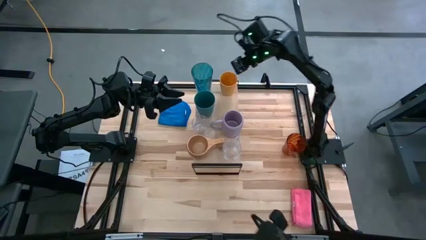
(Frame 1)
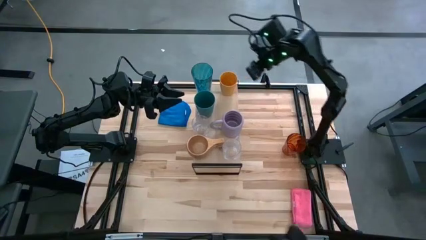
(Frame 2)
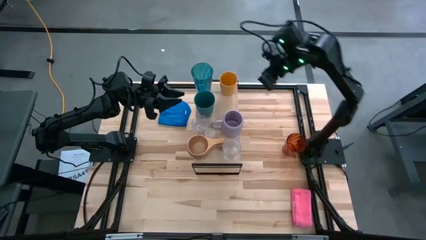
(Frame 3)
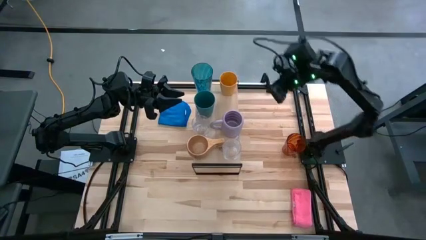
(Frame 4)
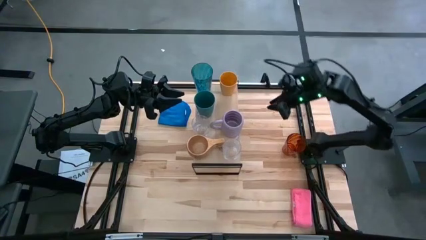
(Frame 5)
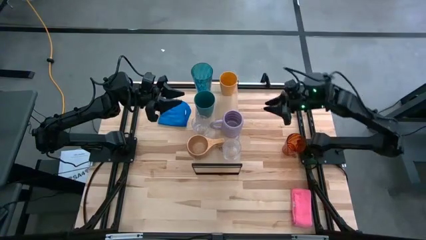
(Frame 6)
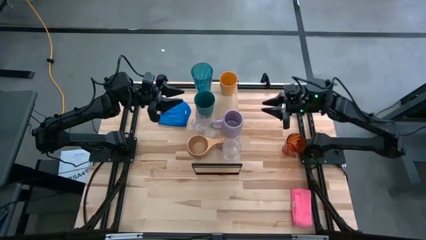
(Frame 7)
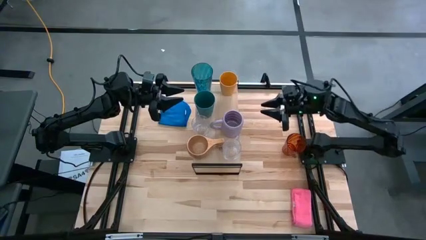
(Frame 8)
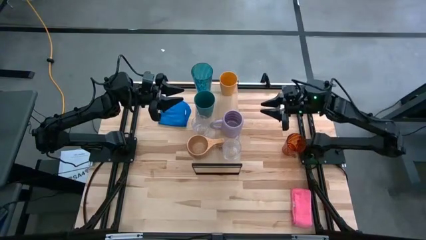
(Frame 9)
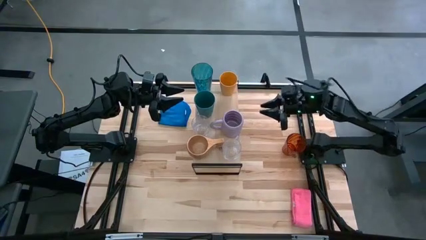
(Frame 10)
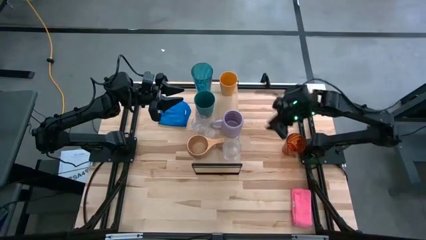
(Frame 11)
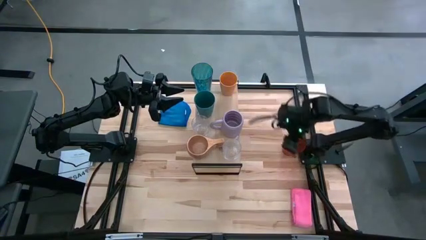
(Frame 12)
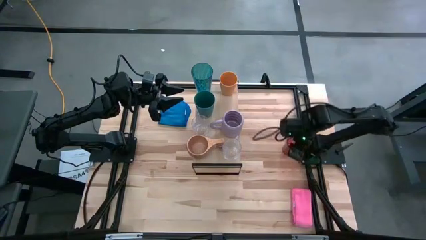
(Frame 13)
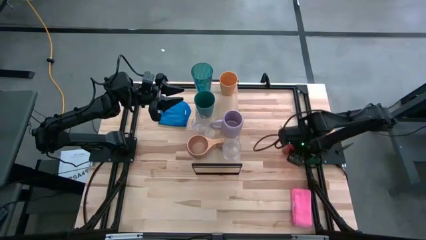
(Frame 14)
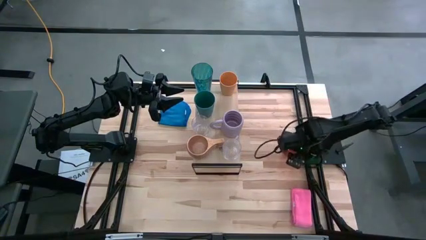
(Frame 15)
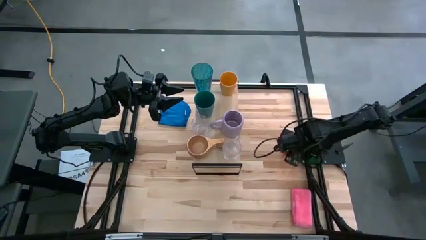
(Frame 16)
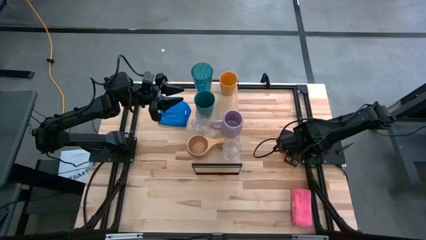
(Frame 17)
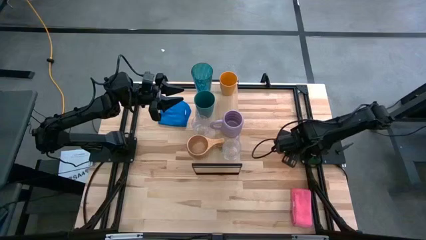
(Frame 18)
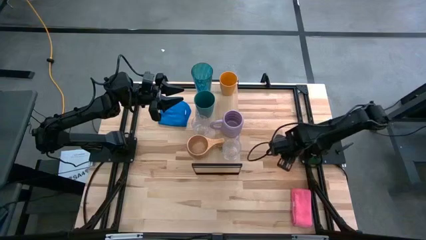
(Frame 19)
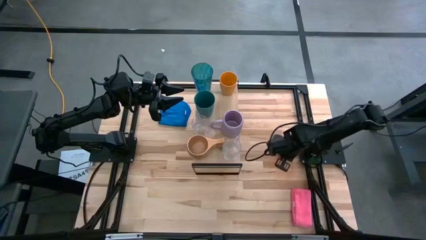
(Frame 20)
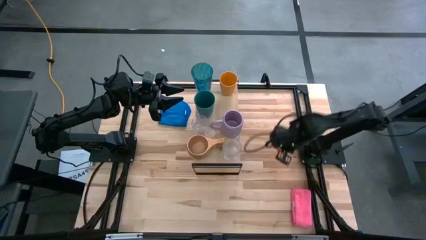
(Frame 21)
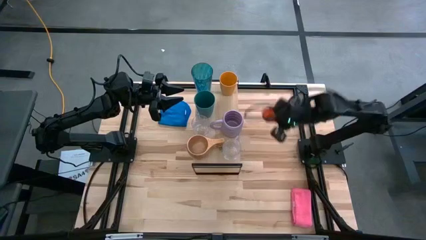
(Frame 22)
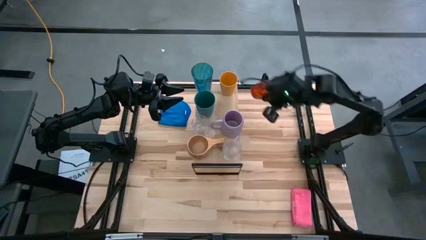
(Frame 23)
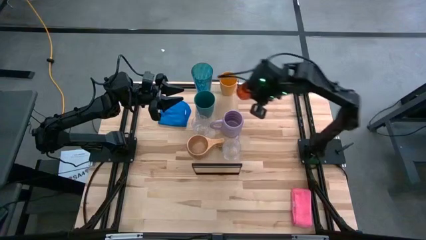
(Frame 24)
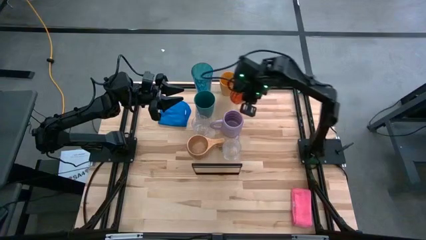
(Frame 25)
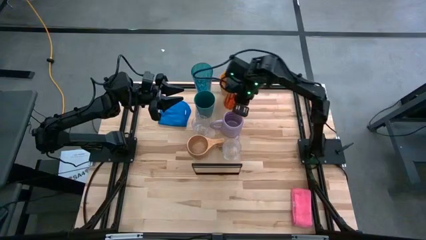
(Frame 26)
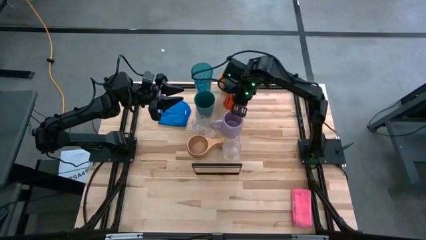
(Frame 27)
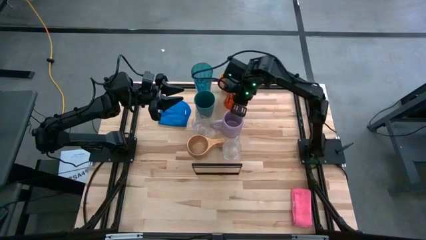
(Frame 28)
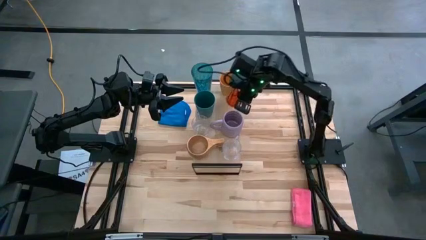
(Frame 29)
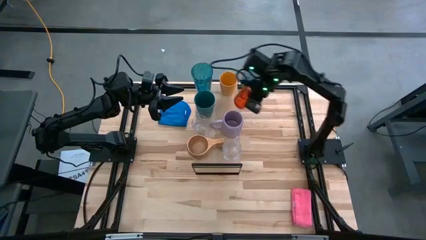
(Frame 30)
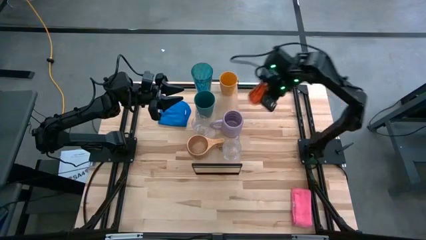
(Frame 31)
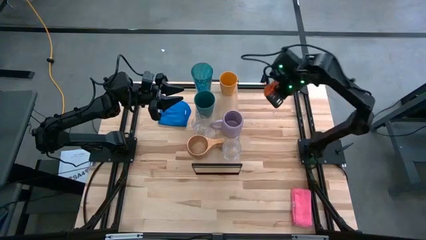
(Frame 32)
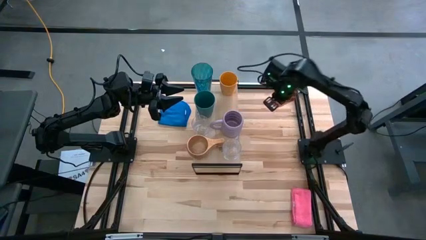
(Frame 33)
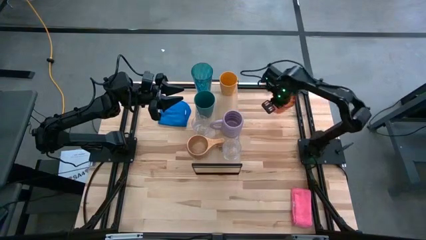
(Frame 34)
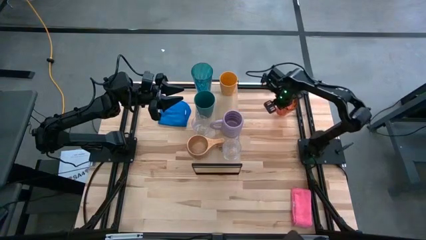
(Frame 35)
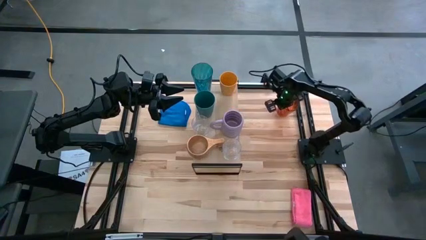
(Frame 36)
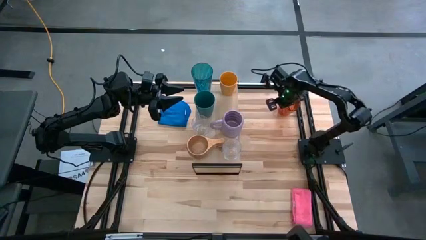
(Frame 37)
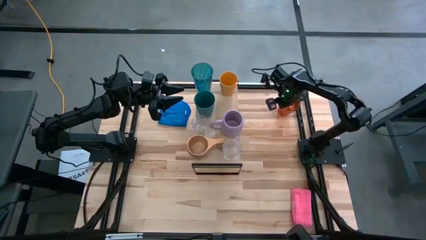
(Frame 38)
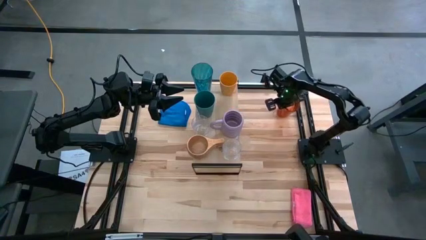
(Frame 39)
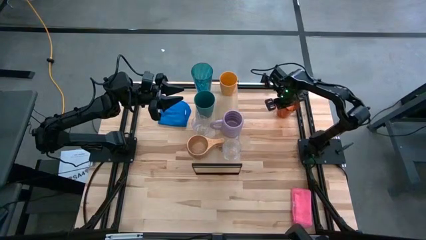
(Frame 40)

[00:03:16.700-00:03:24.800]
Task: Stack small to large cups/mugs on shelf
Move the orange cup to the top right of the table

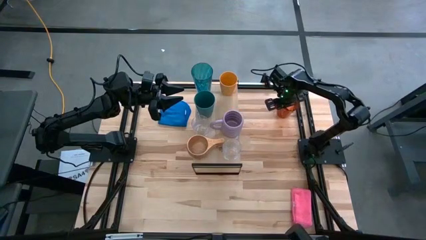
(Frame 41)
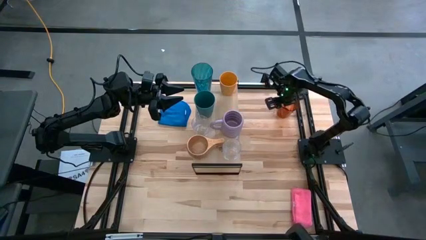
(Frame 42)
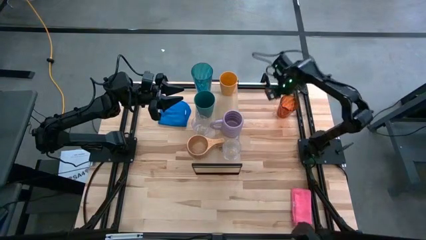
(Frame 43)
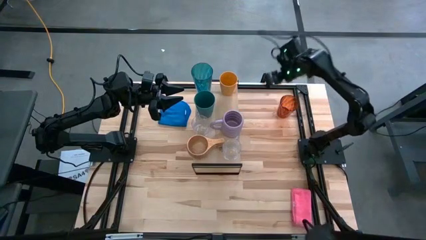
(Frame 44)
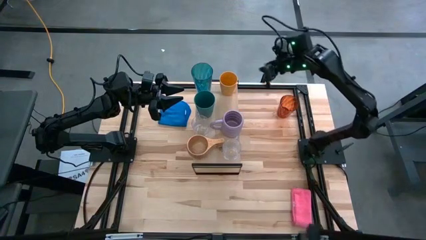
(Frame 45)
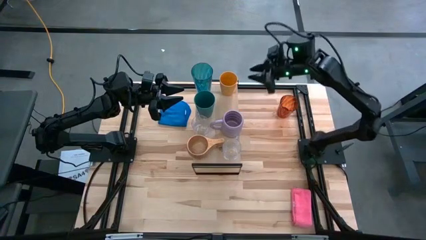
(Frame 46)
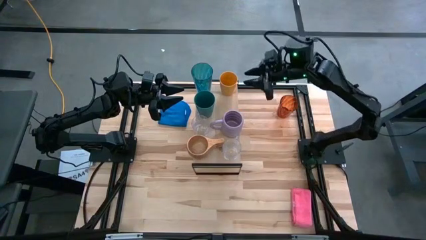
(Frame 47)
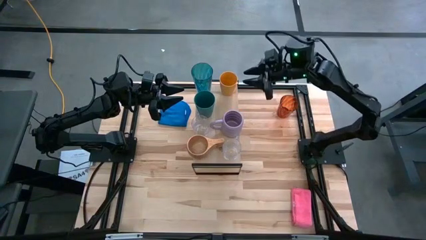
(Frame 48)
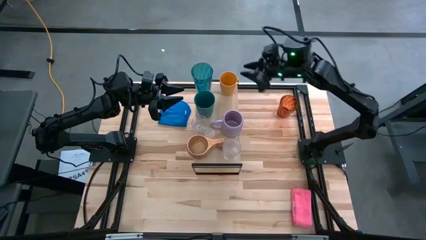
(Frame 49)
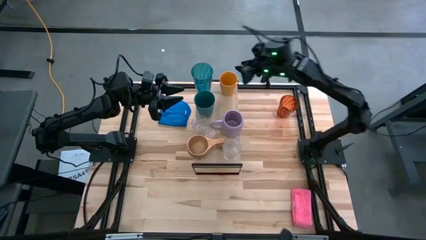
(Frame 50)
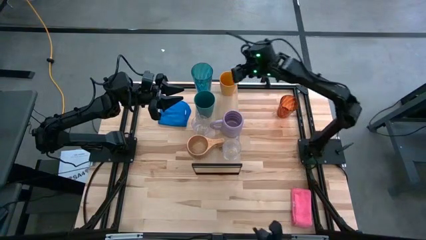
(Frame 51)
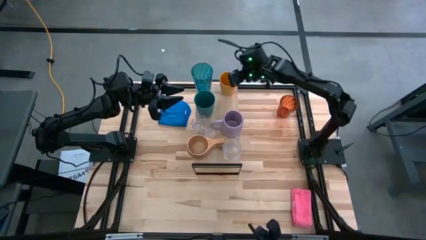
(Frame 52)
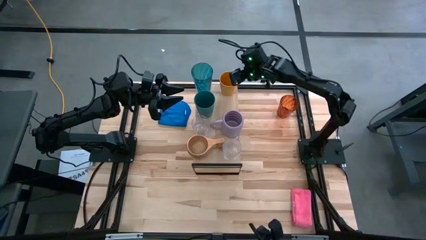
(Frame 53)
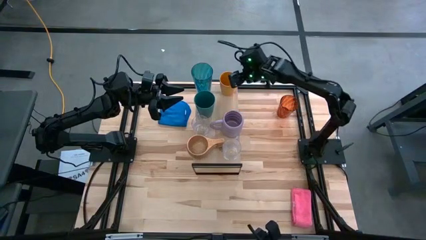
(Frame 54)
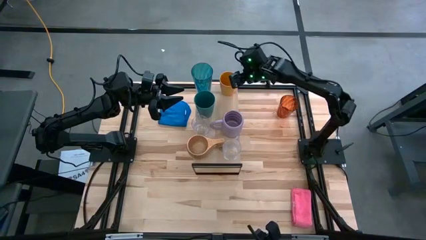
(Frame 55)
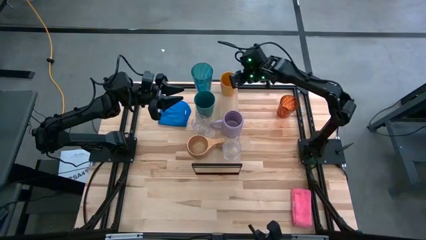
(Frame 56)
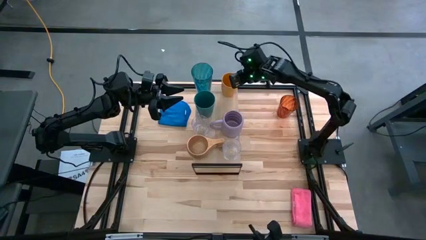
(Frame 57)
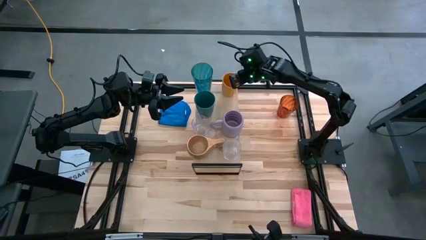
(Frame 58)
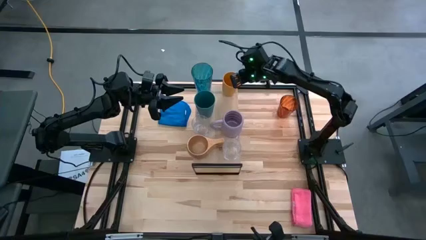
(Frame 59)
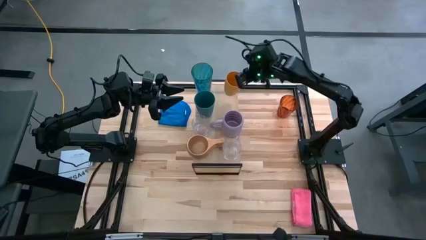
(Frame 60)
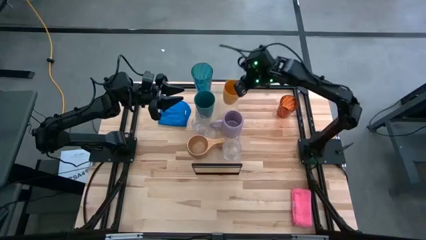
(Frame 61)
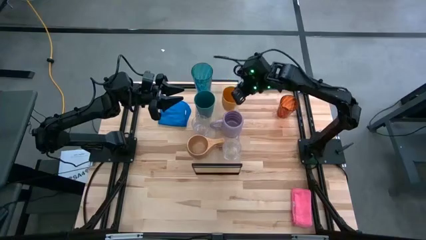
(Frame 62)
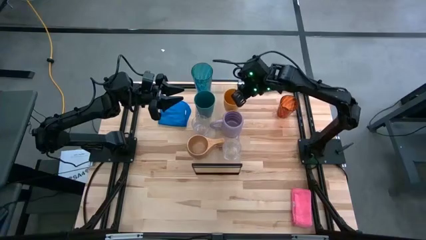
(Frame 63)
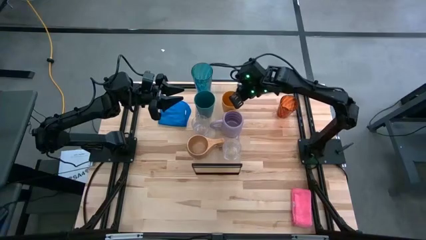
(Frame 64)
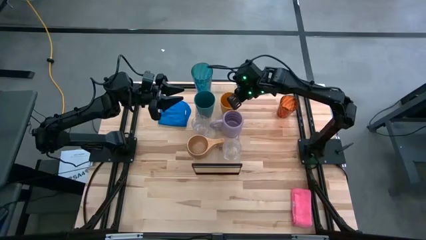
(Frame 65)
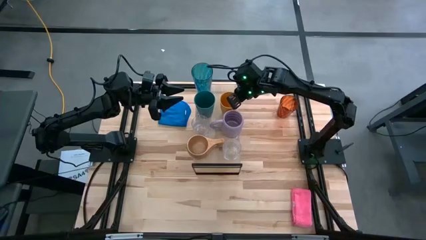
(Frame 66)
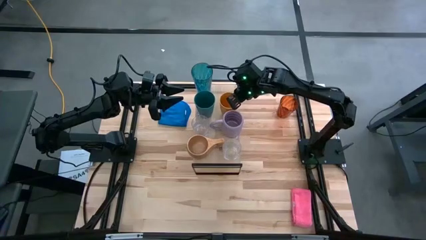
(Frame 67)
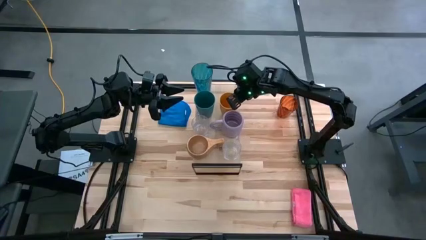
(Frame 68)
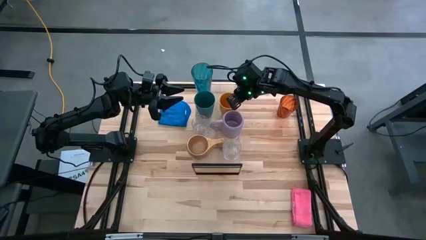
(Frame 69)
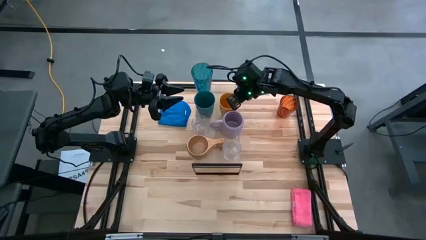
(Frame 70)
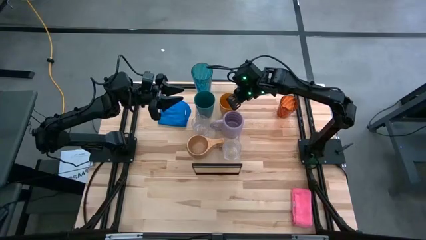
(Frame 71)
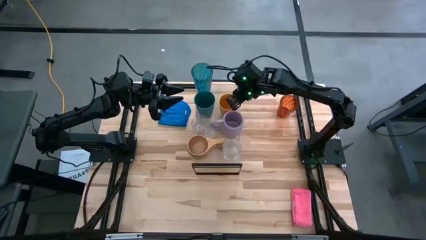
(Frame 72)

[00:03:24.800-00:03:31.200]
Adjust the yellow cup on the shelf

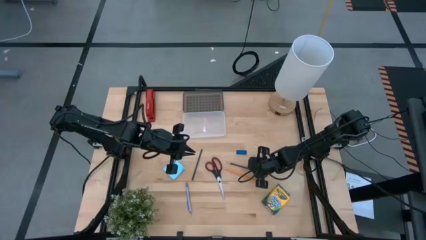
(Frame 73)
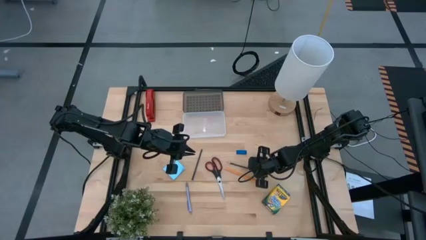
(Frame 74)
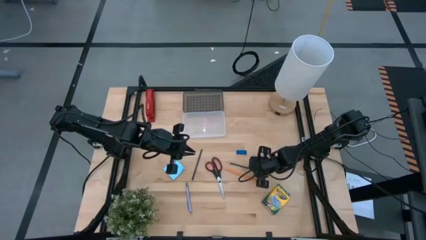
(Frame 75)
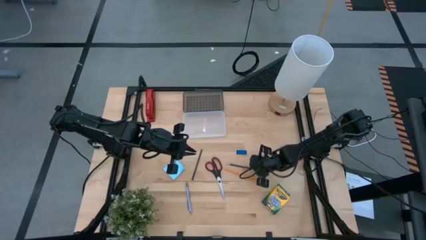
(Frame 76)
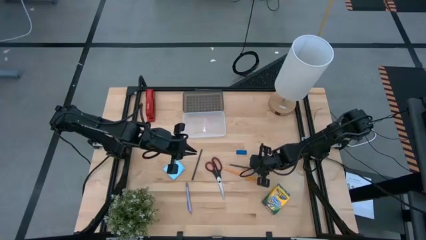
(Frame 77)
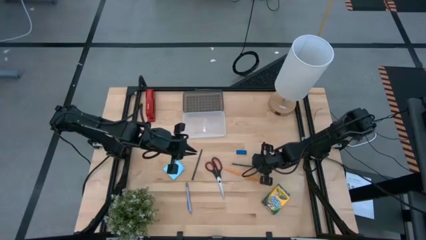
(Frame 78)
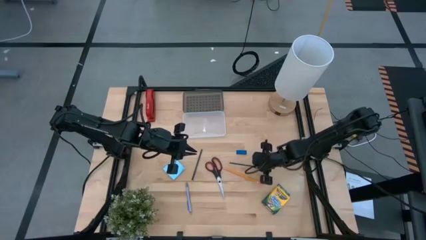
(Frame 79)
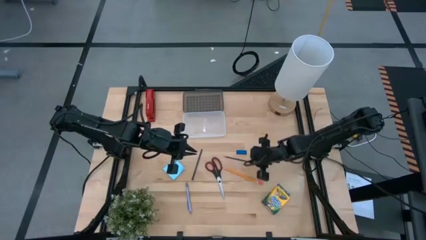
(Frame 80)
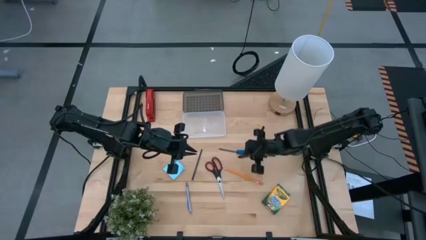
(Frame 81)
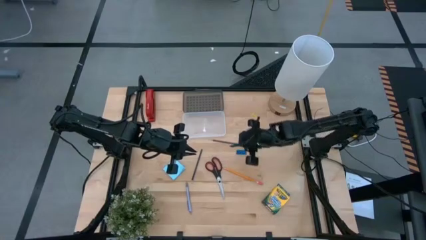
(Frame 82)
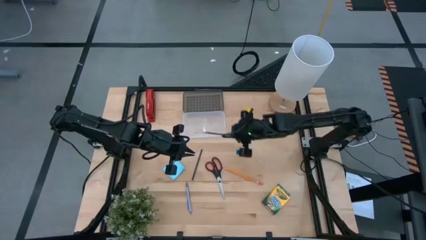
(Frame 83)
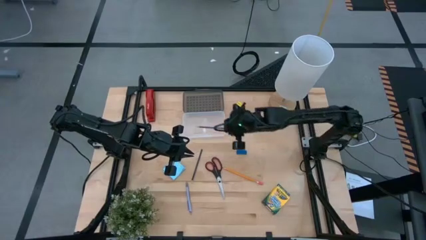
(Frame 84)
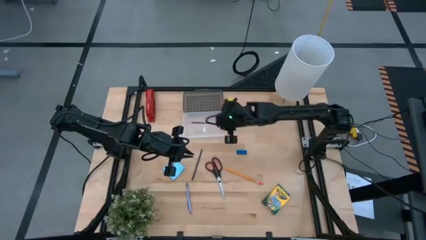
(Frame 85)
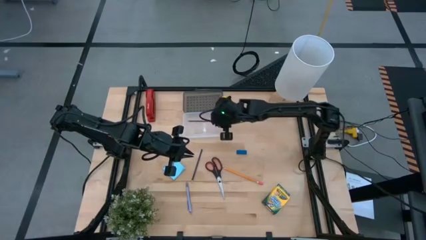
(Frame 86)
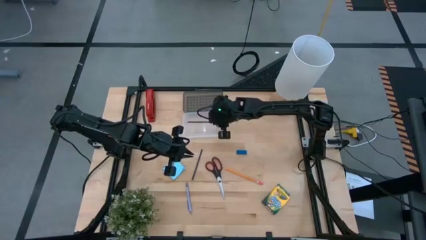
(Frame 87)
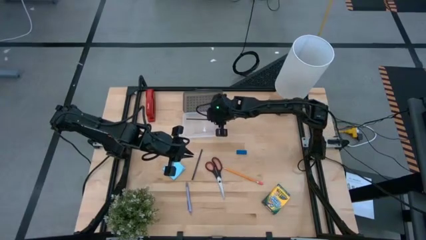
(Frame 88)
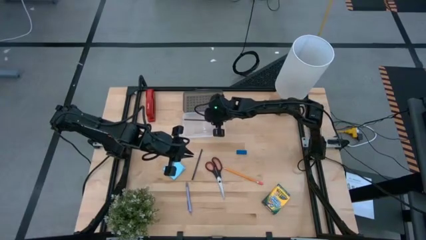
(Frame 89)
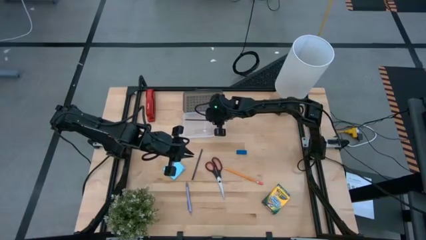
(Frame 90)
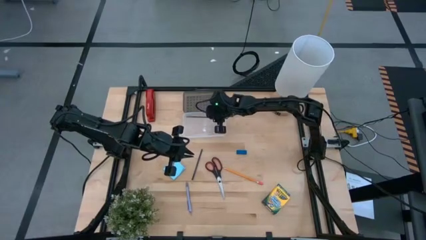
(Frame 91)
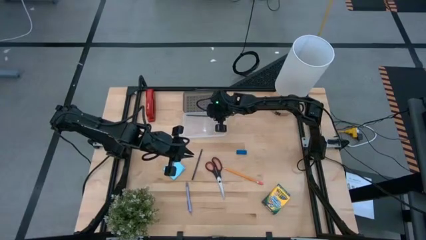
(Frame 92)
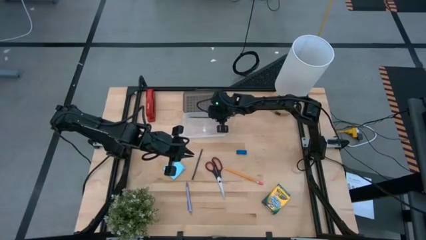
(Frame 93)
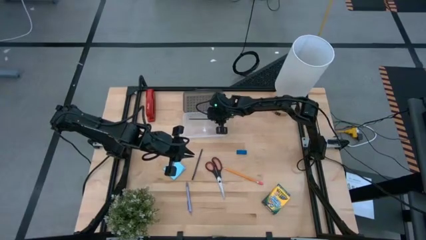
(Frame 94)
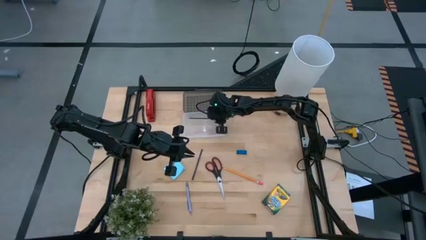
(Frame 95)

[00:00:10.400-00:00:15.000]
Task: Pack school essentials
Put the blue pencil into the black supply box
